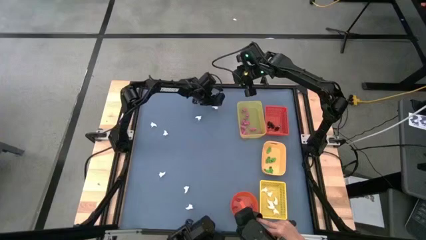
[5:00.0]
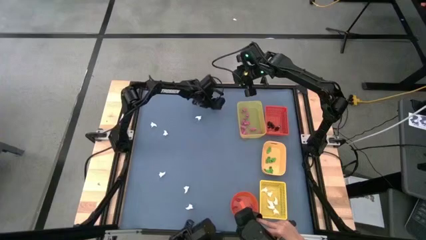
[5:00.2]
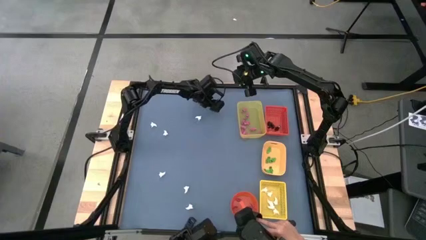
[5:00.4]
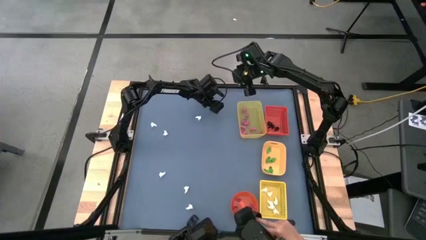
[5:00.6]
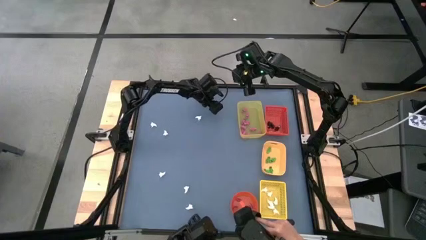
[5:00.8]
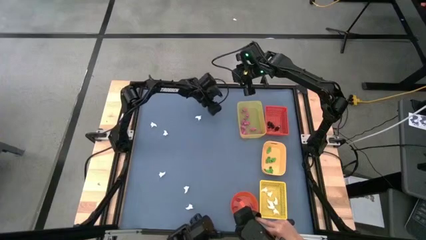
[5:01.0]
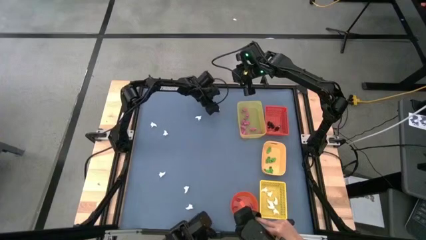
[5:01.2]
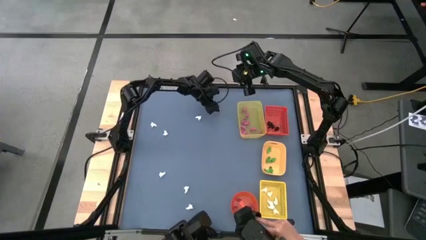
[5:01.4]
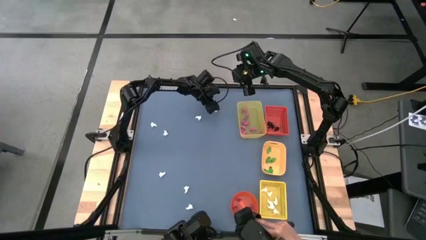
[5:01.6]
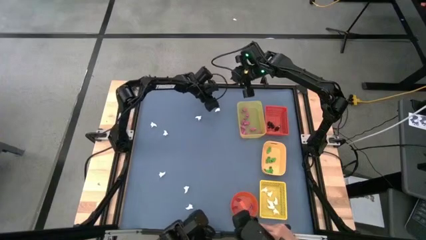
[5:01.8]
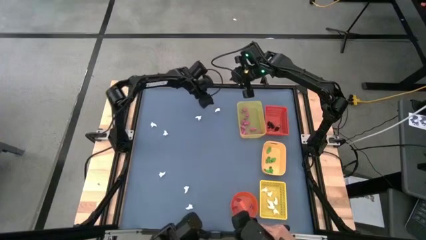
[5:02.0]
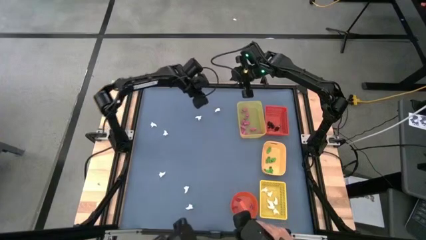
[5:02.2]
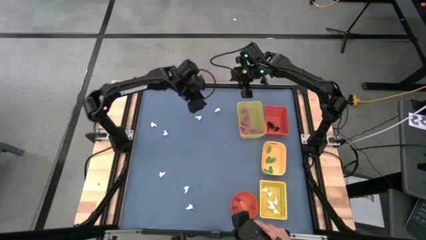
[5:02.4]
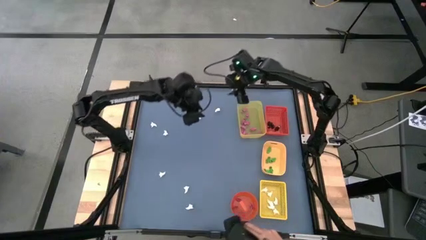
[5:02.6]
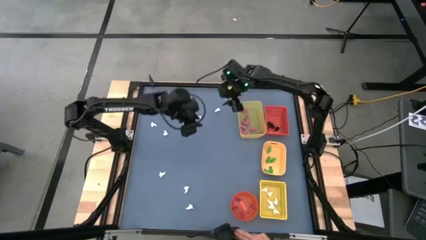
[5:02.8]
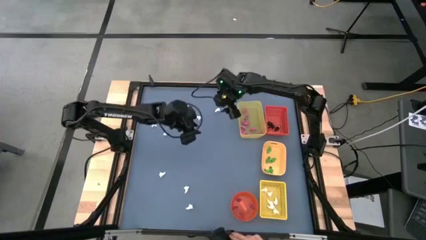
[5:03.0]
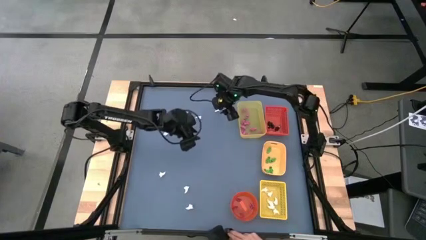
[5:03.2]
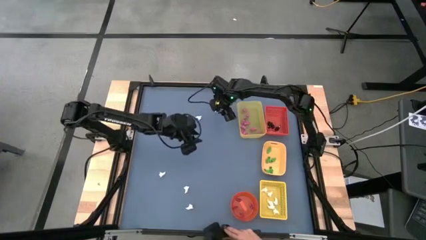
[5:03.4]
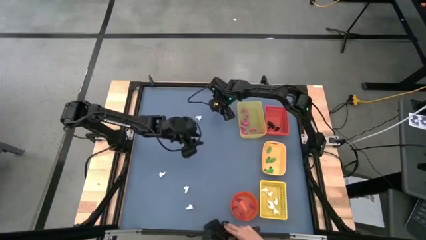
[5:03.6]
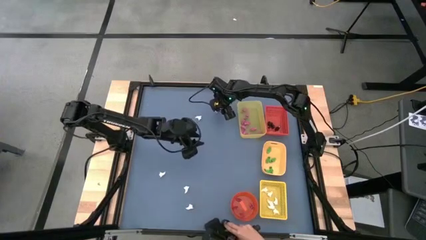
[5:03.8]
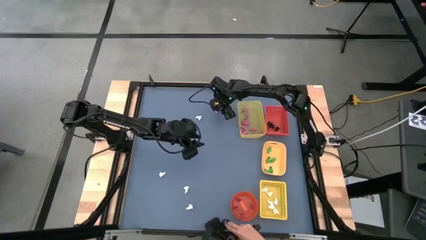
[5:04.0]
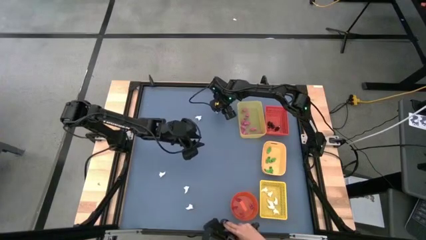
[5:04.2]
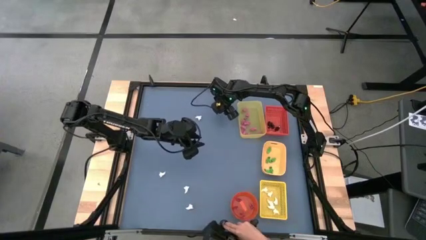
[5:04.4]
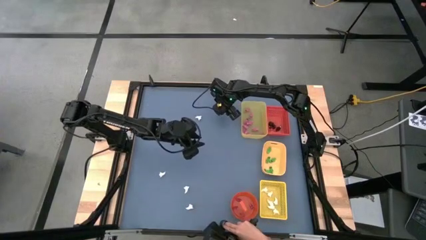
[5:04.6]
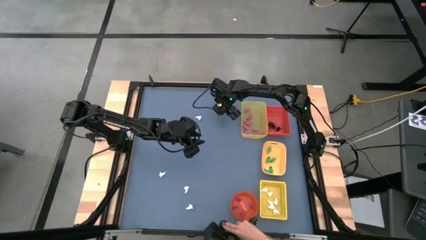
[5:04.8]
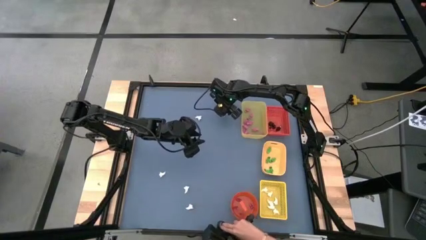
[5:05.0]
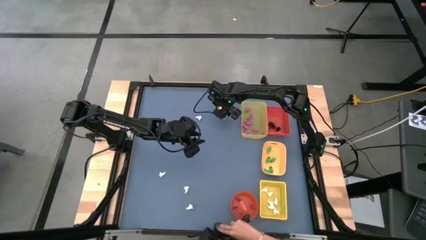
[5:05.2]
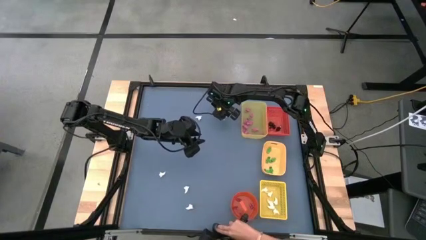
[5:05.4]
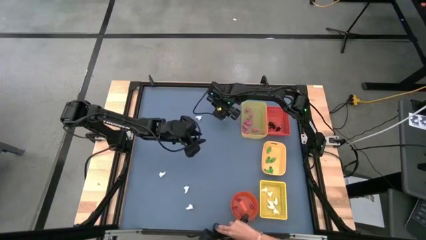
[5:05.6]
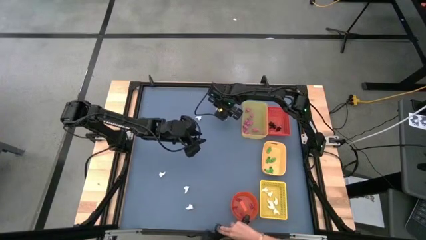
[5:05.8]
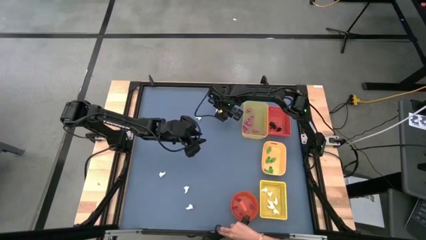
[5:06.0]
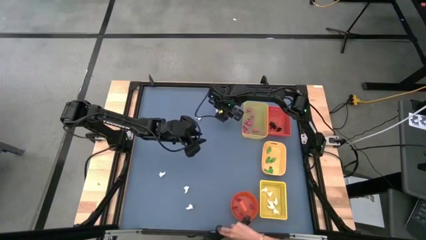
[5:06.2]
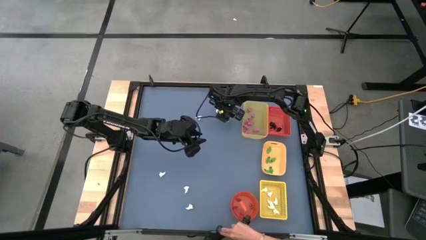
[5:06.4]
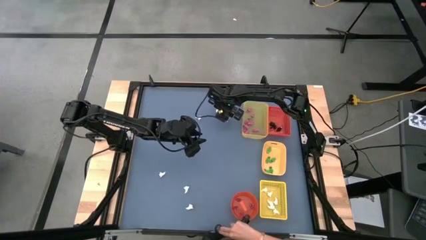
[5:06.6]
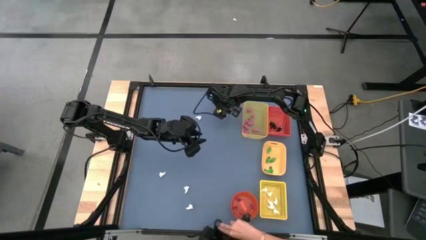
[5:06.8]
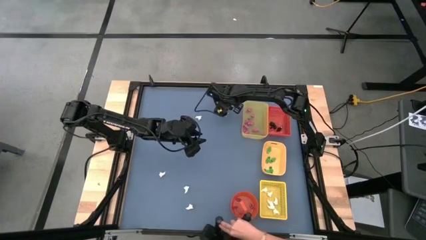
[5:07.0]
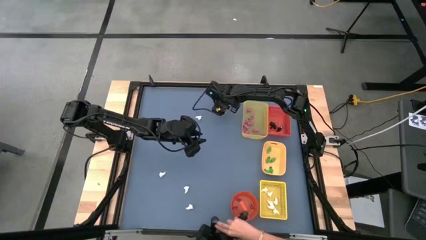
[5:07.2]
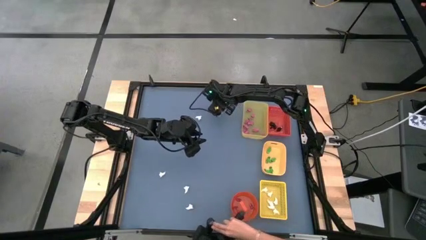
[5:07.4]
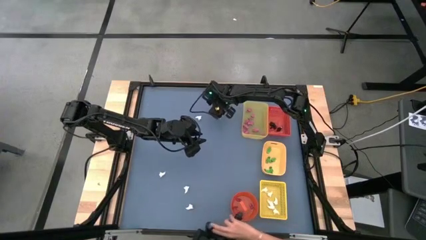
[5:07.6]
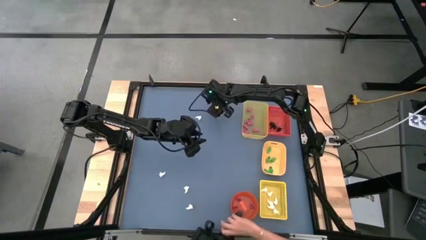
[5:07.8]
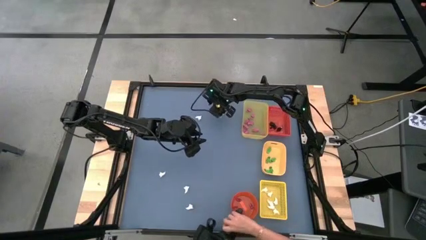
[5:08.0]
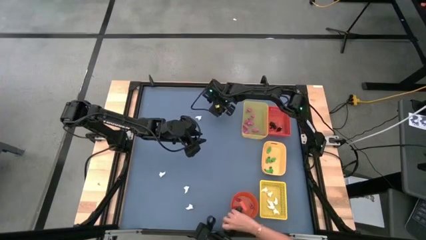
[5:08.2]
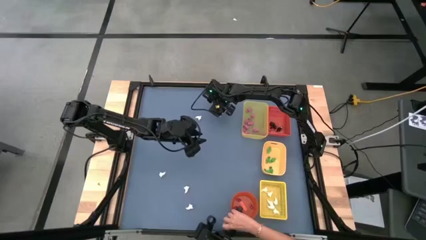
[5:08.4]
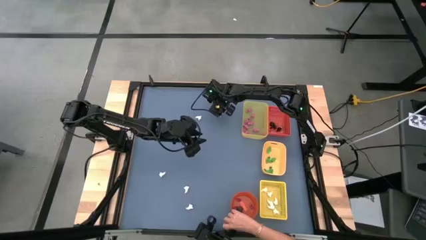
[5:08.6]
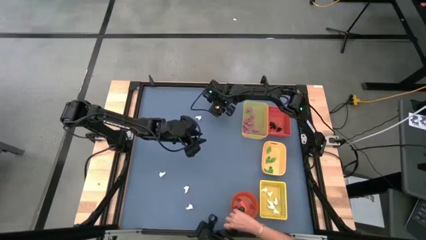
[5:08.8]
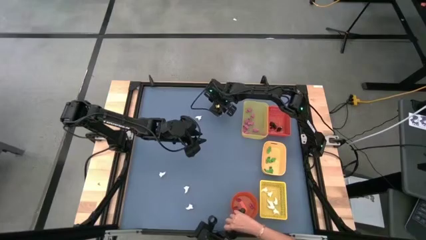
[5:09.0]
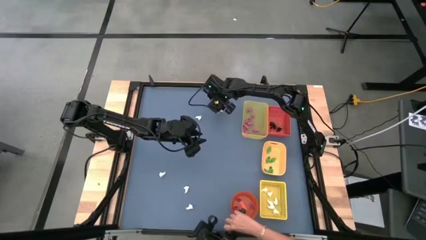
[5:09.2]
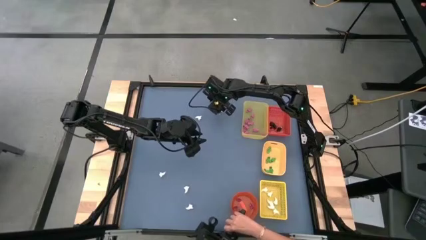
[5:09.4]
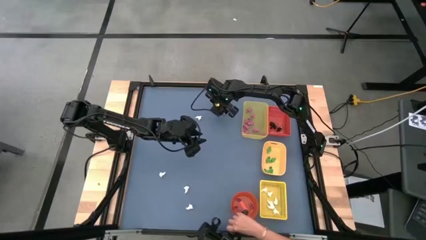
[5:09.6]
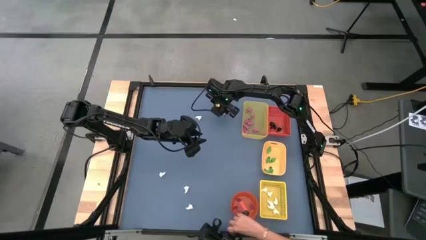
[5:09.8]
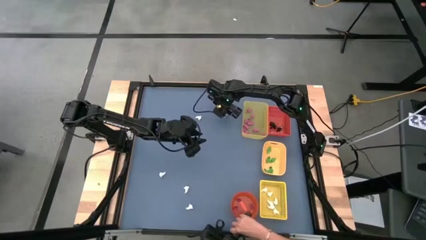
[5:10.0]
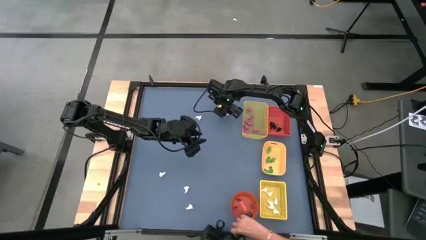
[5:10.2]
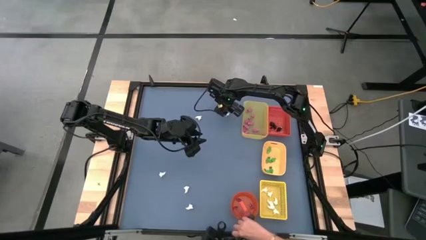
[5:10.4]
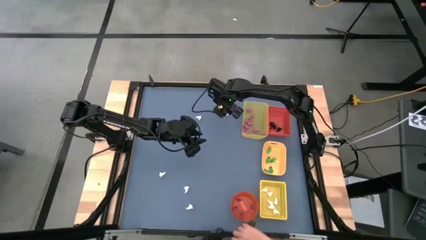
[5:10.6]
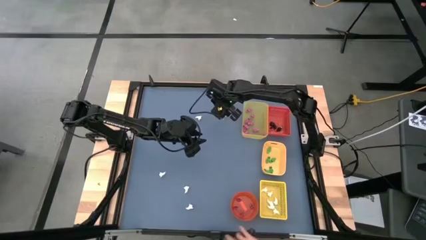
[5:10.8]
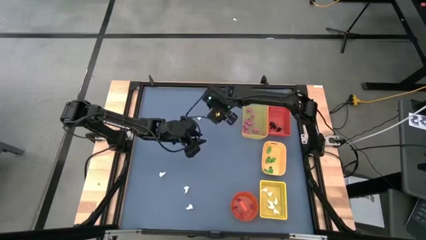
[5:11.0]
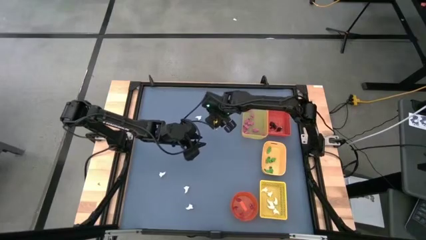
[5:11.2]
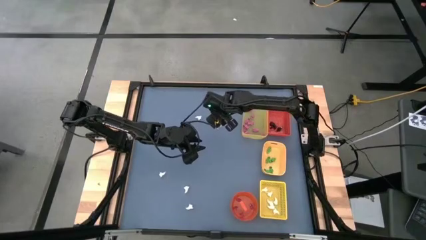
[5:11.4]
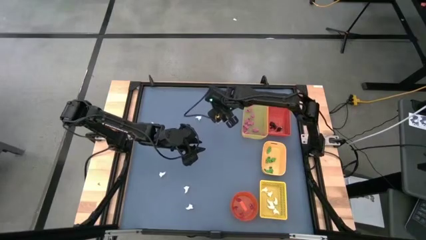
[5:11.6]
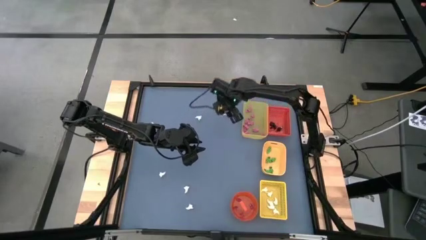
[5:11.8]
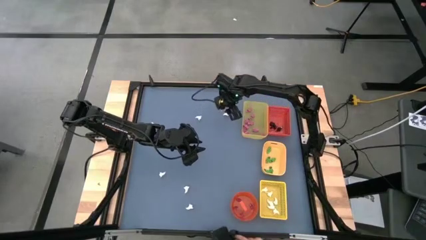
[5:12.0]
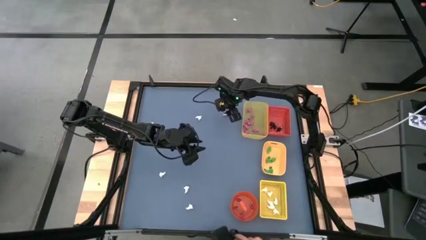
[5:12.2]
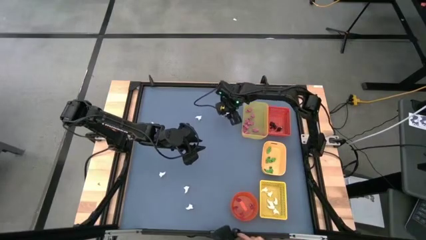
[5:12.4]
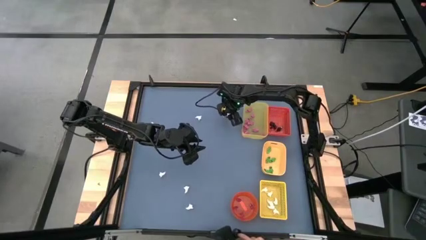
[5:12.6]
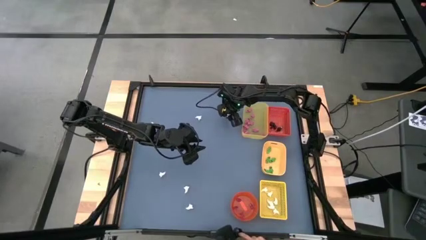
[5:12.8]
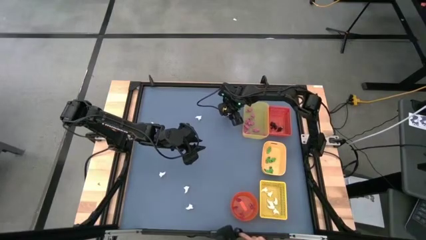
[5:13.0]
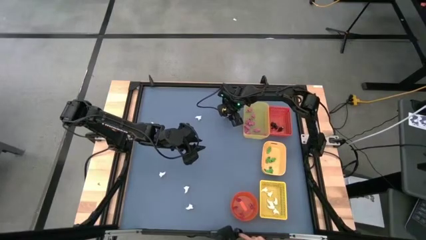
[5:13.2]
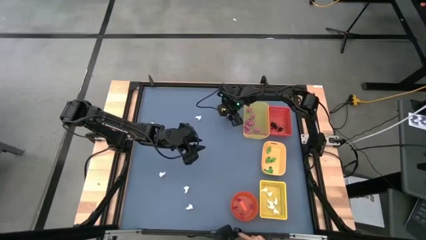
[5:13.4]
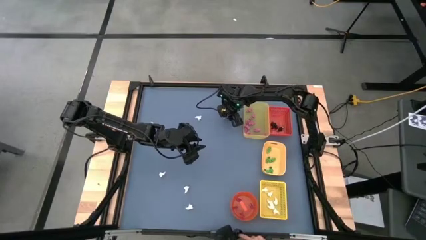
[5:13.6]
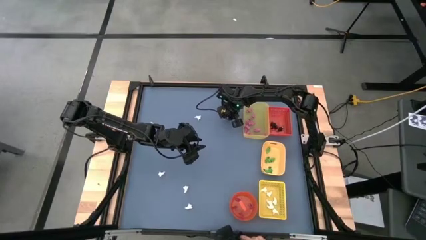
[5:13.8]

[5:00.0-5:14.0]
Task: Sort Halloween decoration
Put the white ghost toy into the yellow box

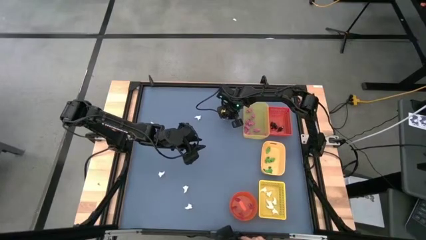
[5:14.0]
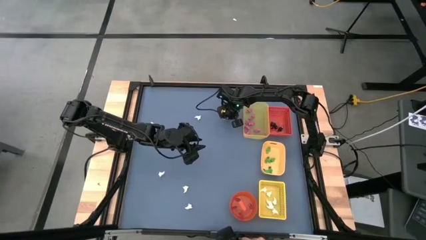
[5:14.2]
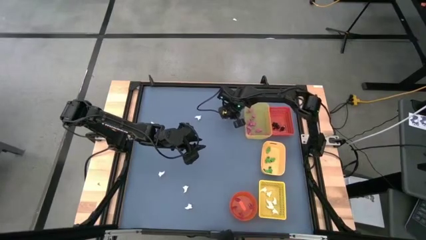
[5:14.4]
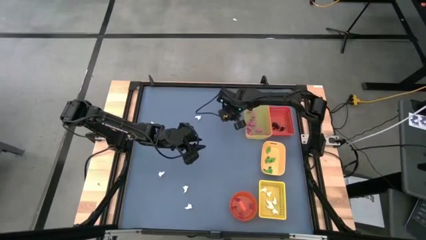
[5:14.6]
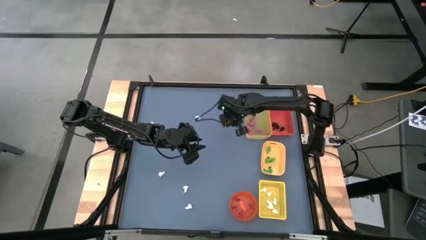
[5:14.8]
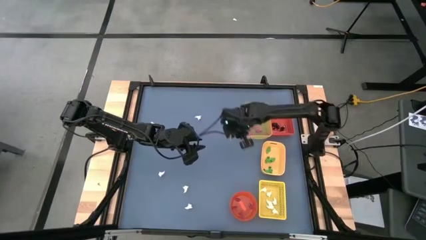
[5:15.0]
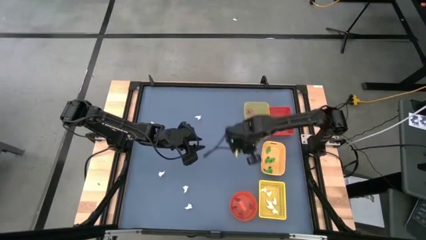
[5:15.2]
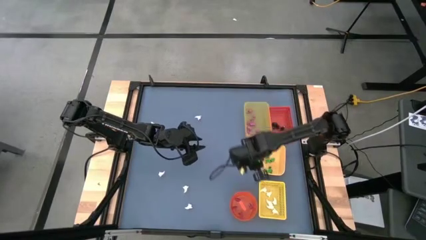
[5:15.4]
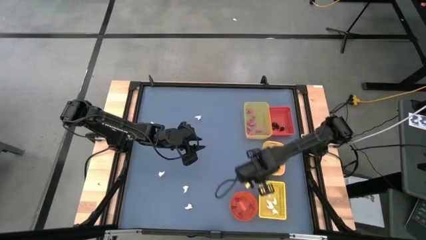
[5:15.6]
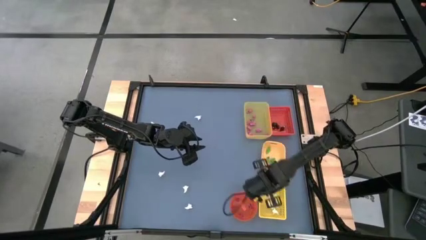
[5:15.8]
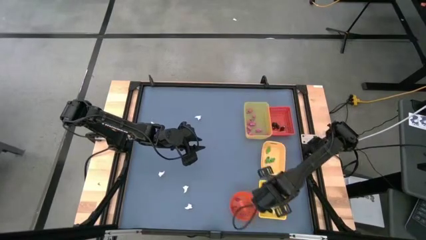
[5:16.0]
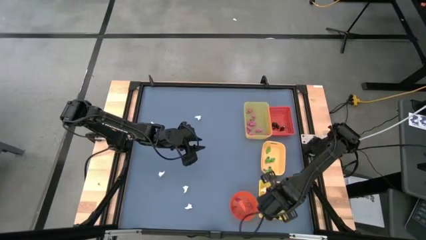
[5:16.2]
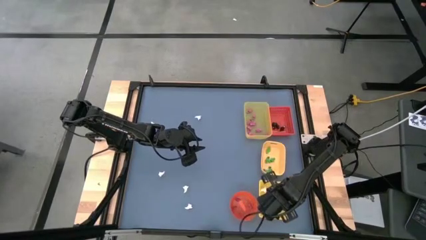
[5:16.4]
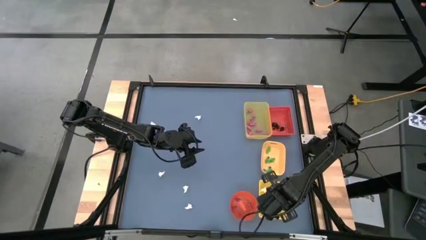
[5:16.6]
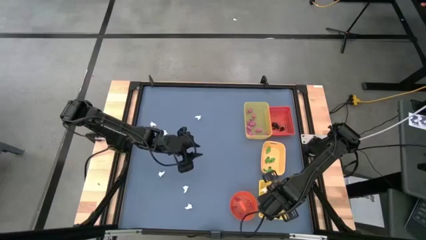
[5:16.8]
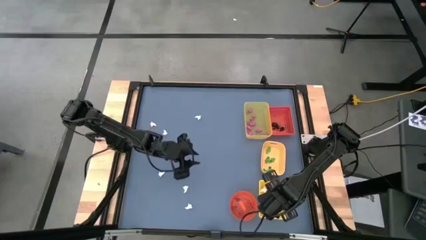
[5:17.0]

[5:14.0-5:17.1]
Put the white ghost toy into the yellow box
